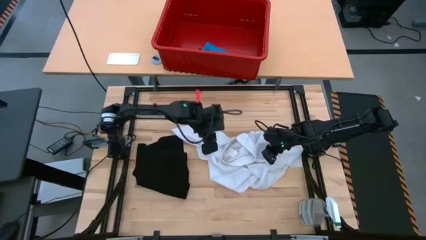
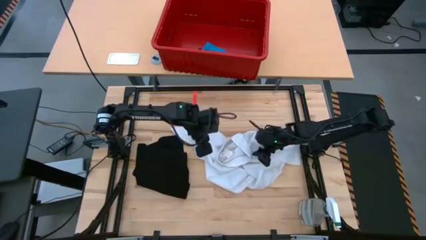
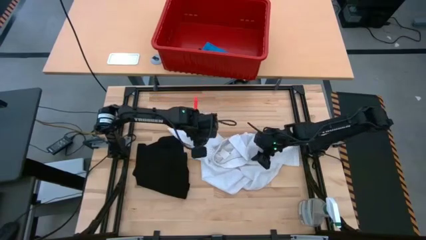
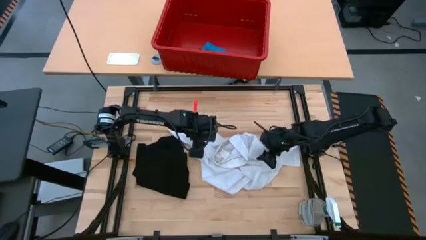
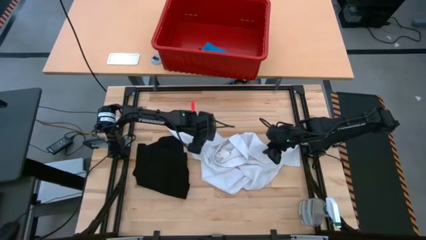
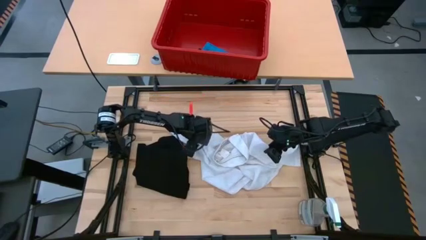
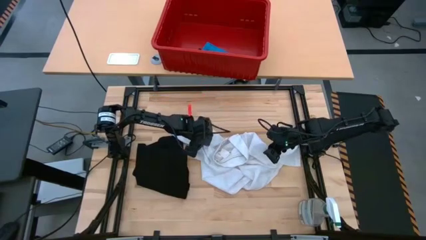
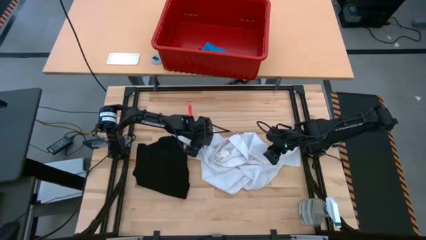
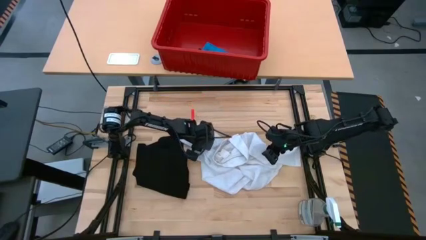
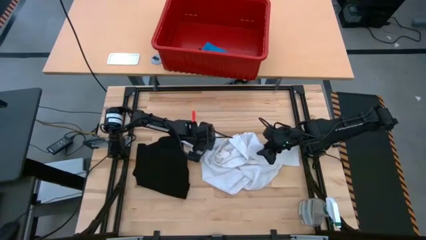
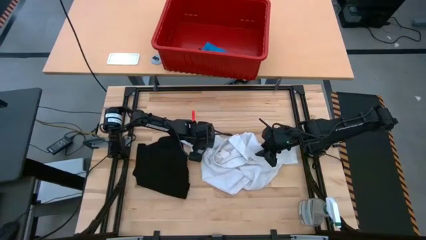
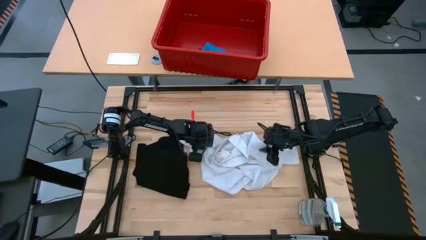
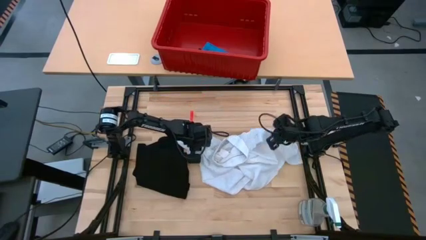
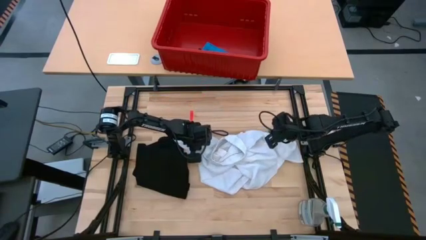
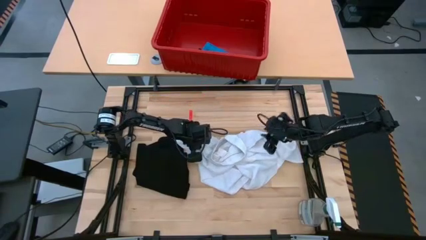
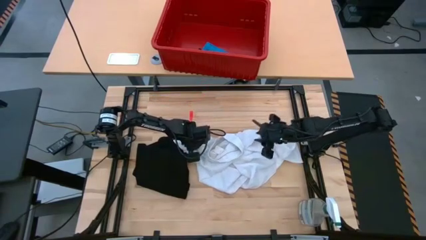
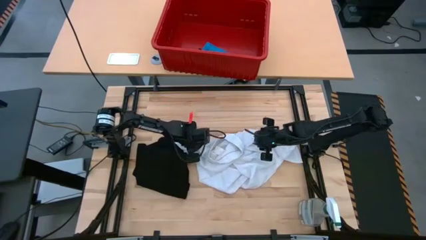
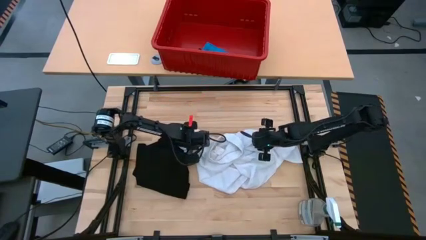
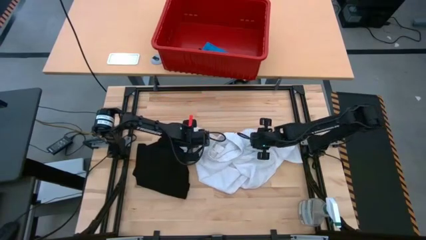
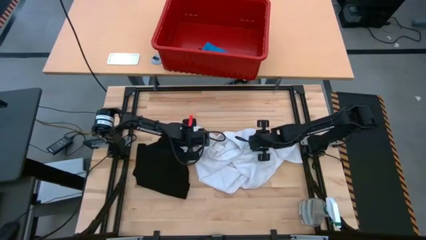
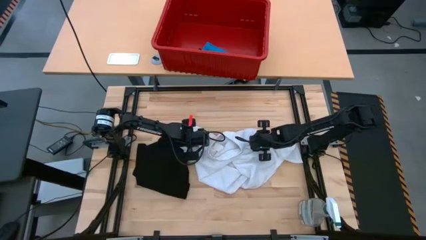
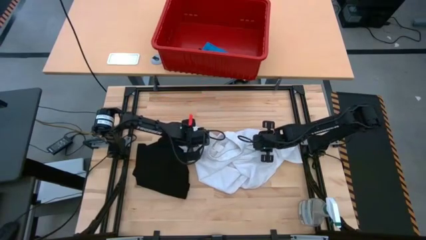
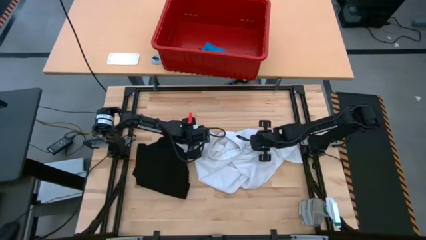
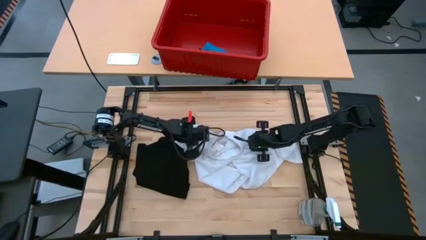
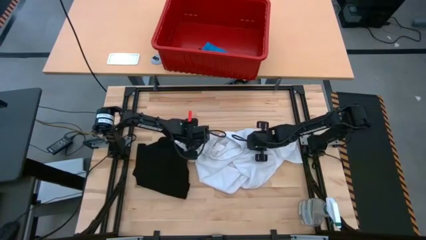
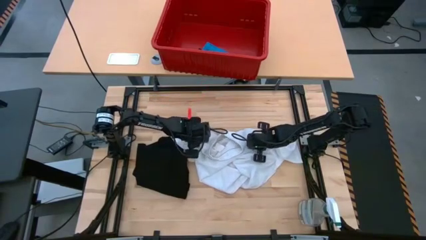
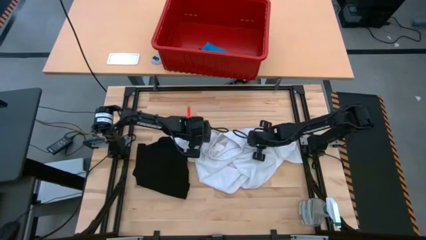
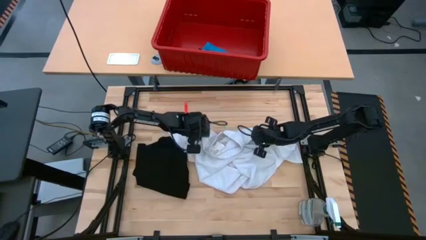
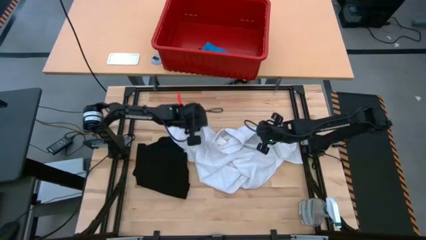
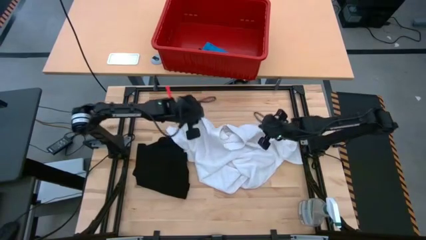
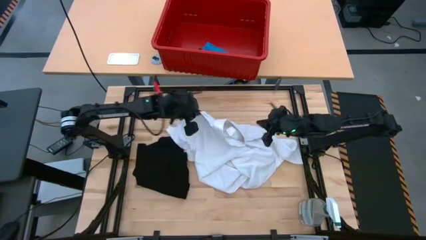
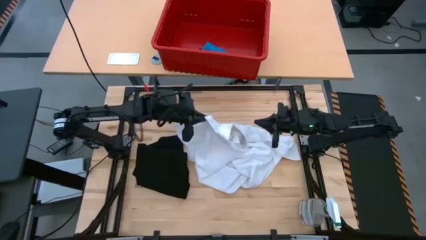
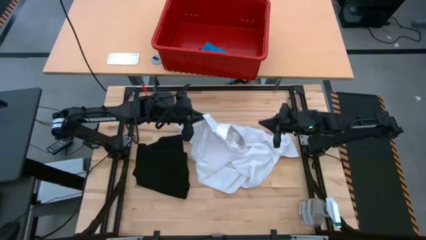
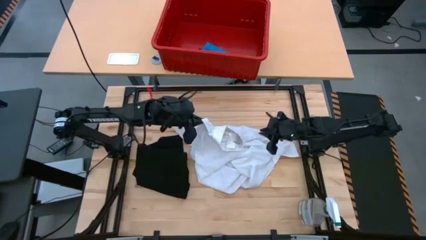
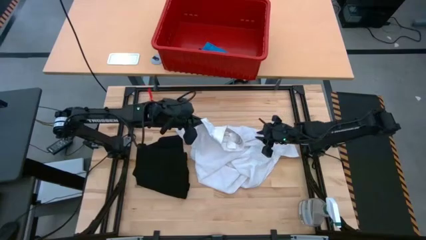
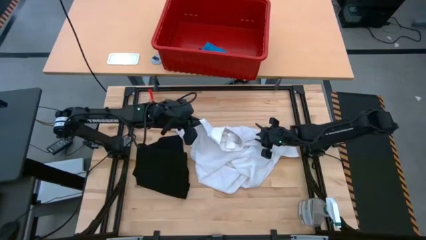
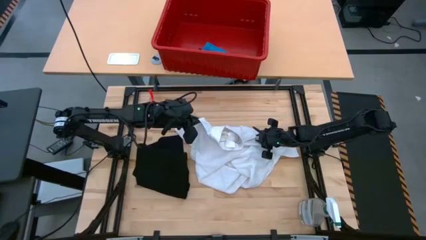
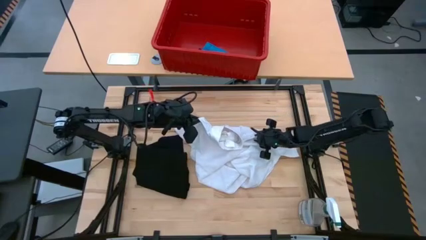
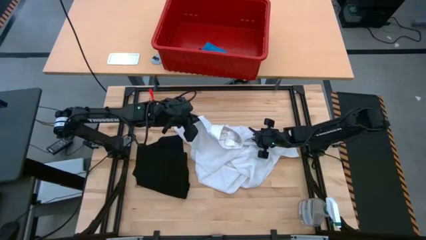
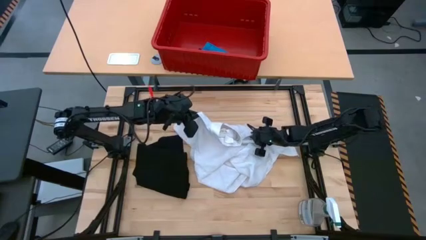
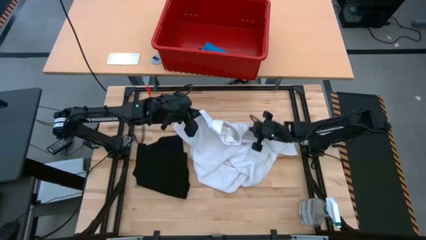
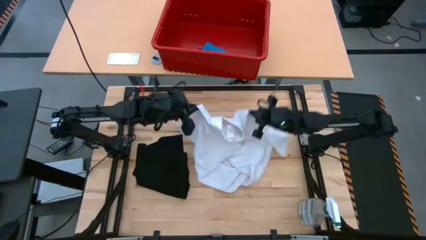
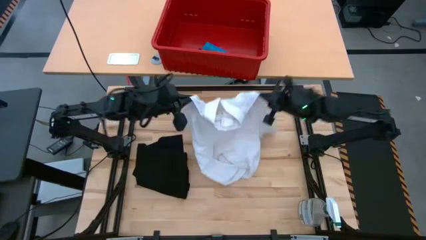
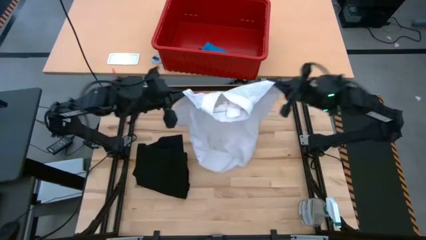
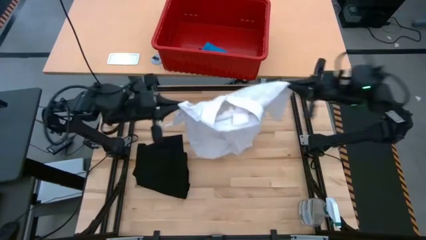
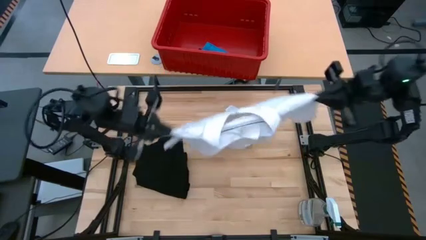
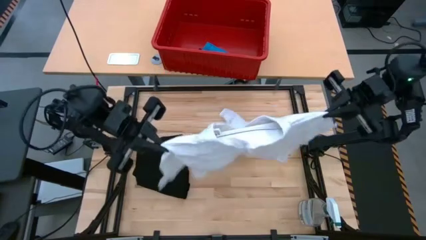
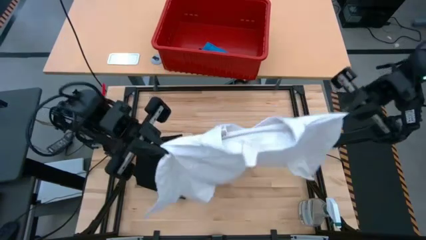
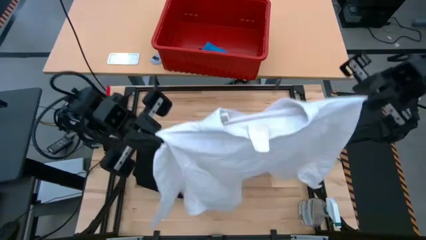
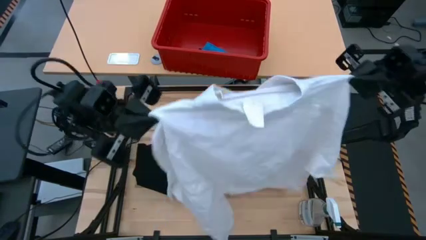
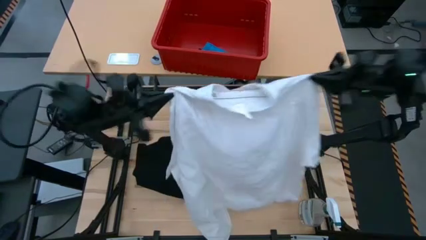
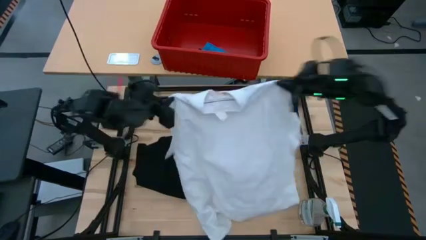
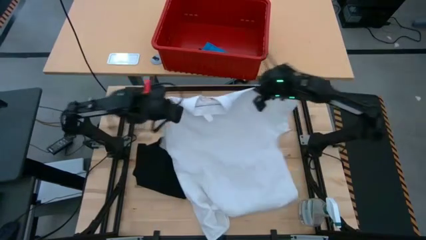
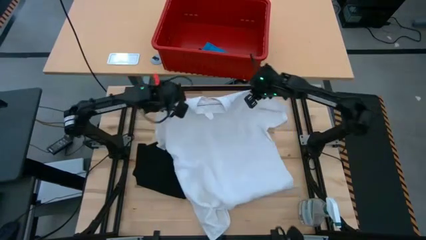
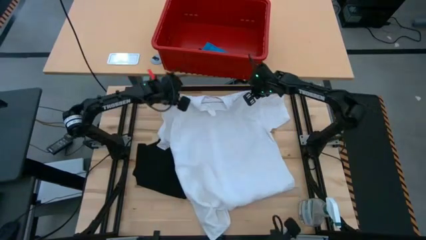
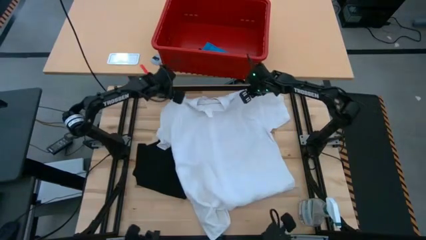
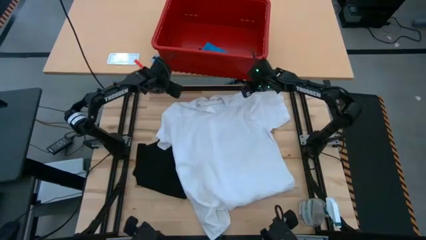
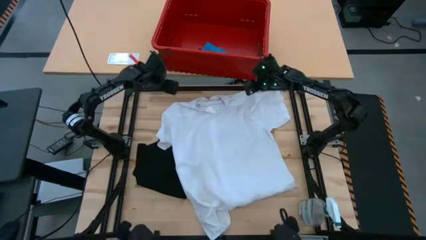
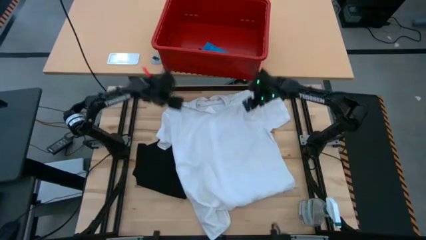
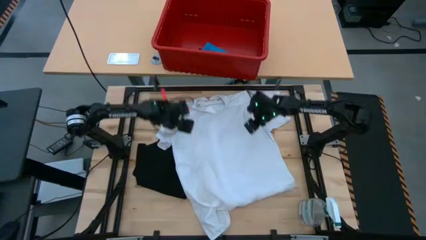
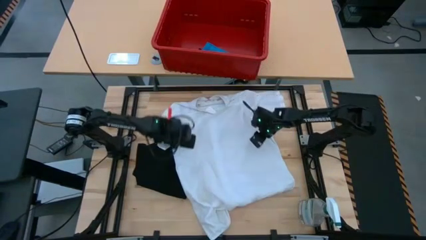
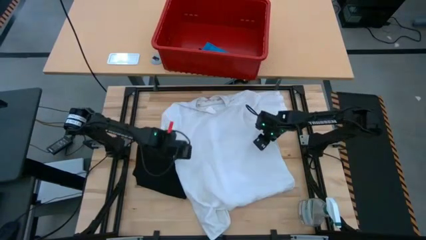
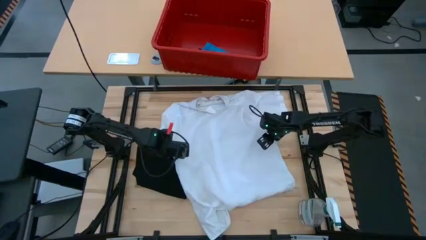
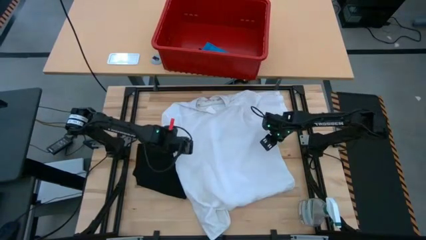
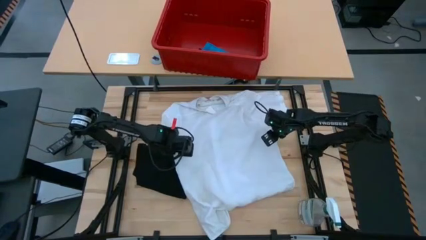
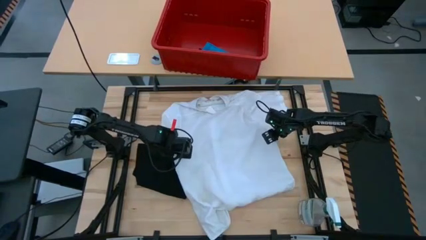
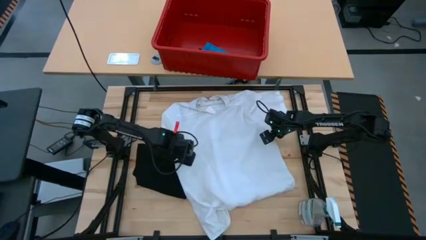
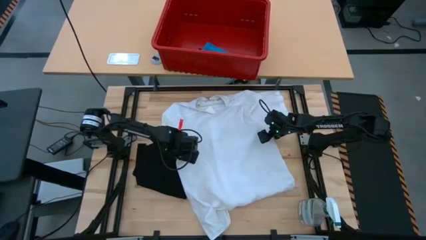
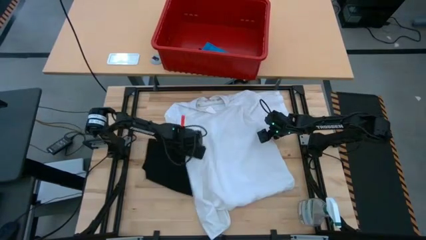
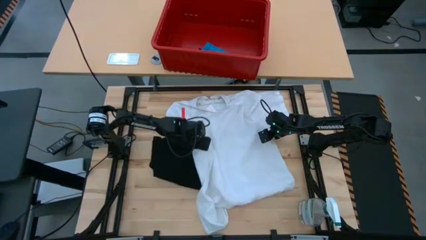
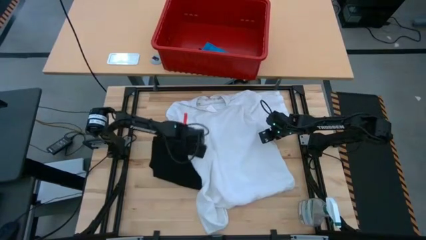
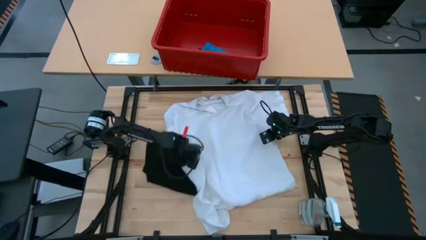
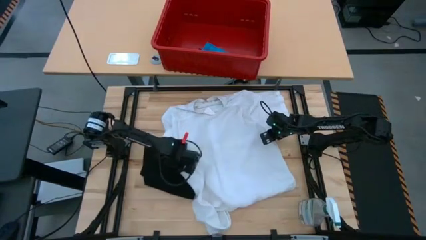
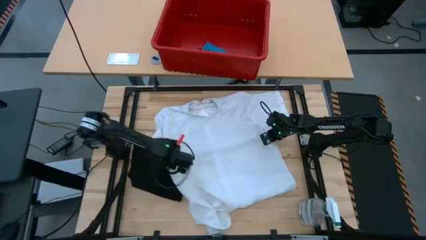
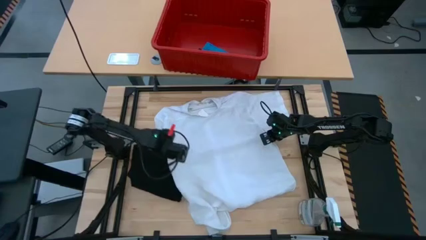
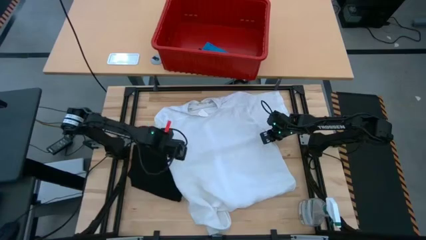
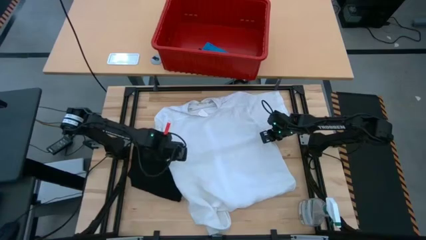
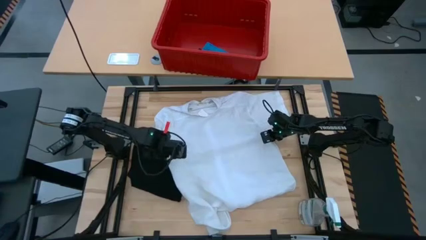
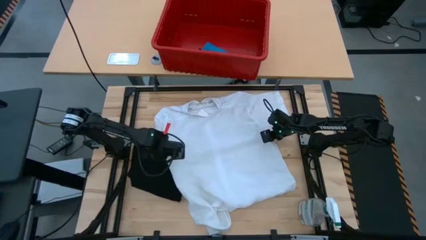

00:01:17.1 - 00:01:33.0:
Task: Fold laundry
Fold the white shirt
